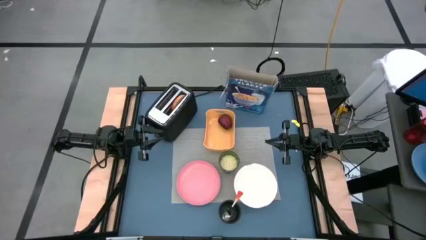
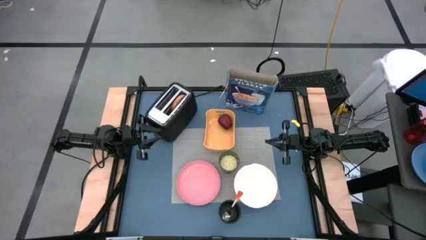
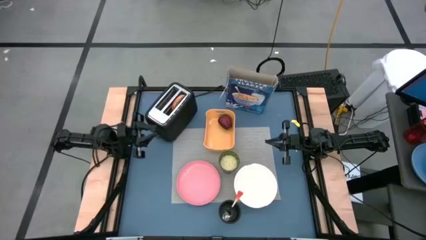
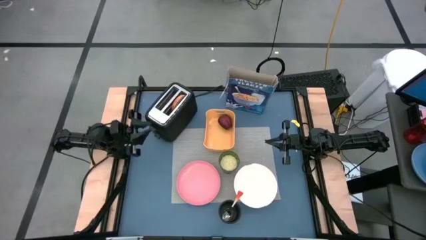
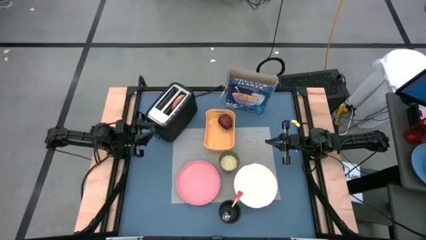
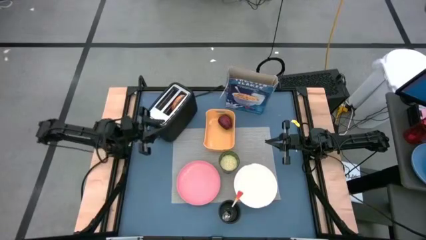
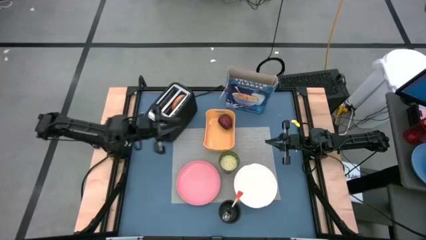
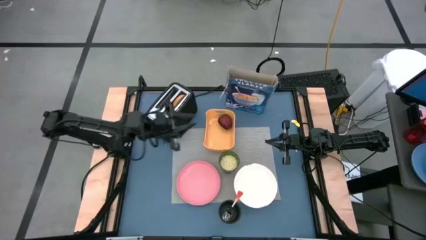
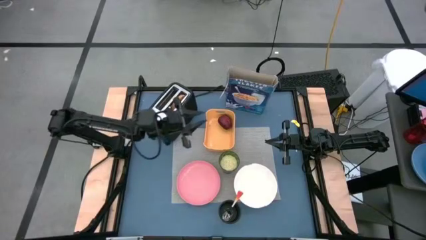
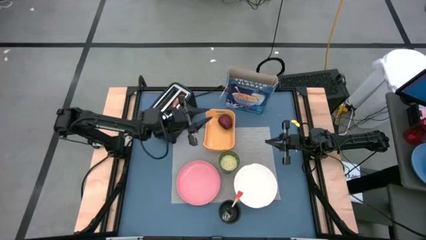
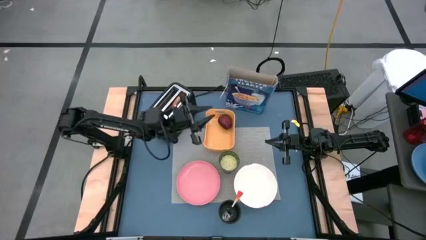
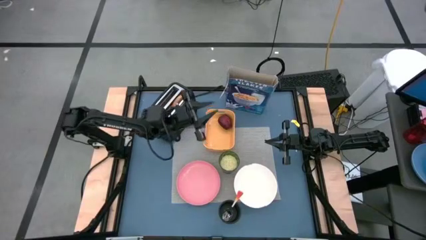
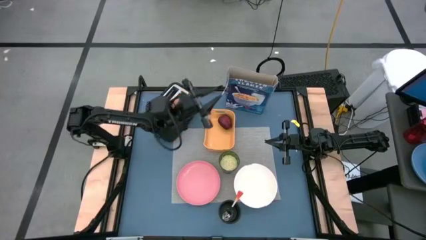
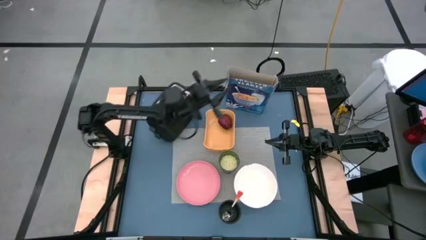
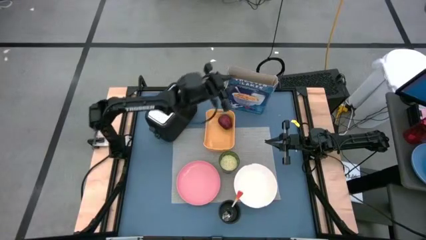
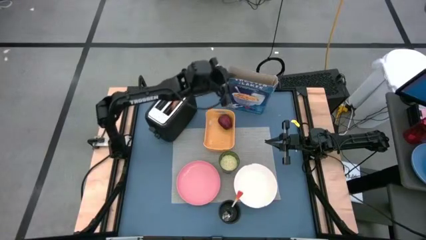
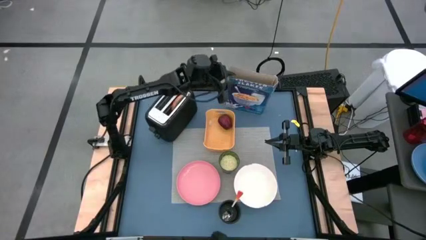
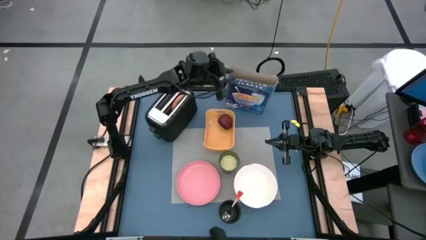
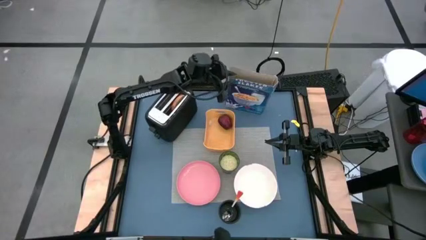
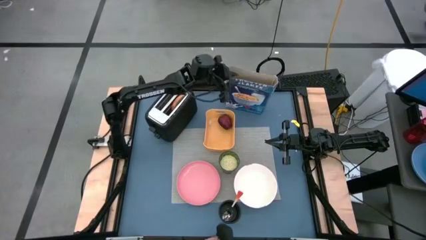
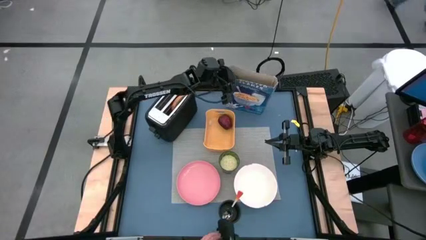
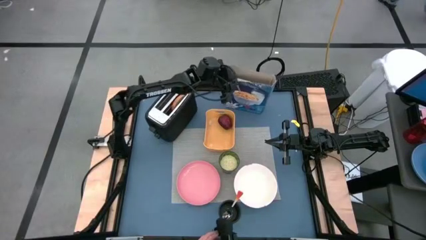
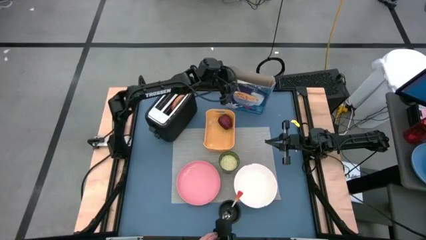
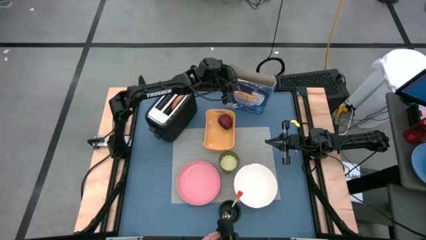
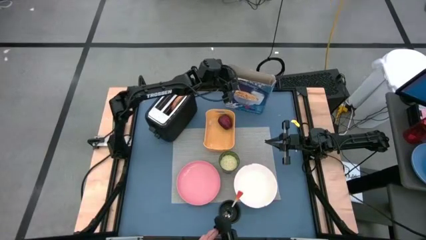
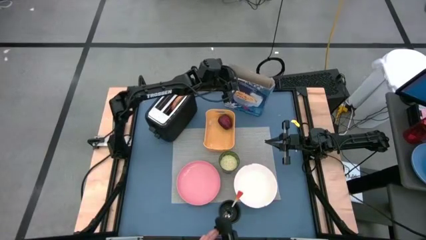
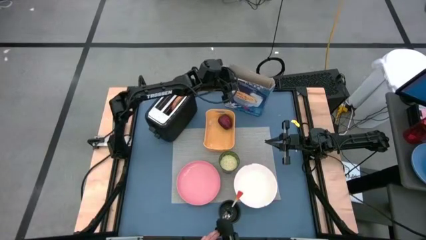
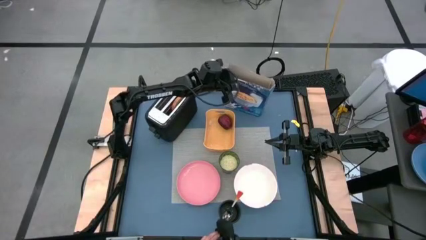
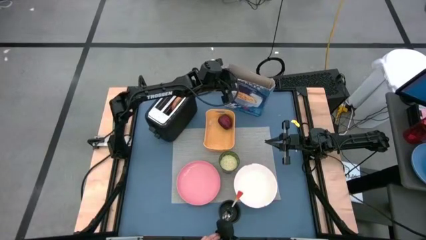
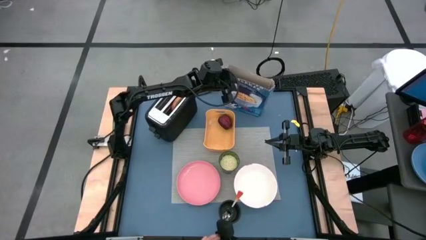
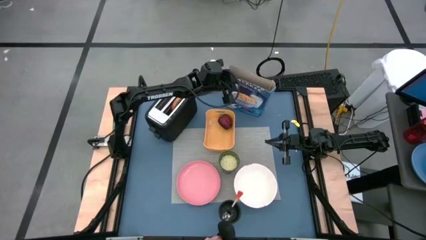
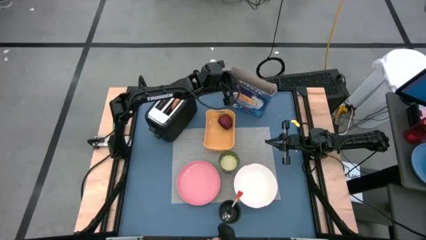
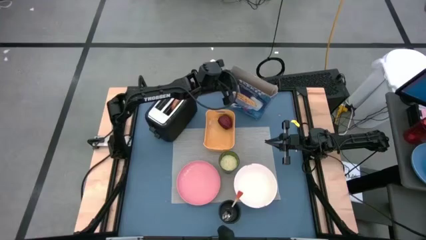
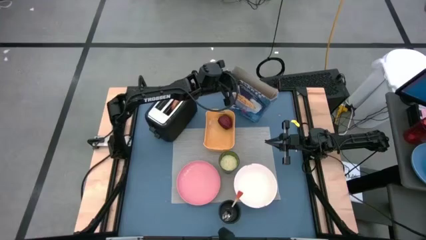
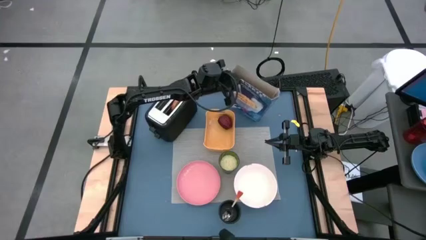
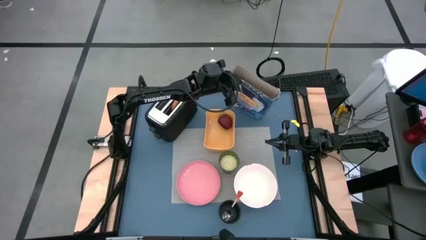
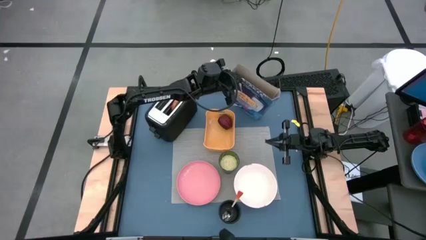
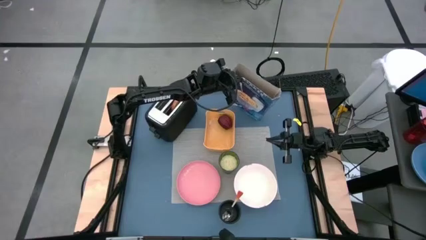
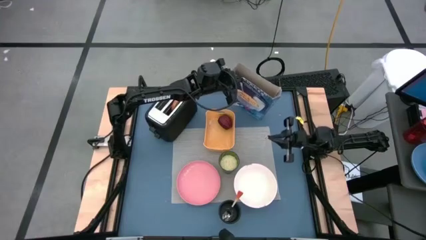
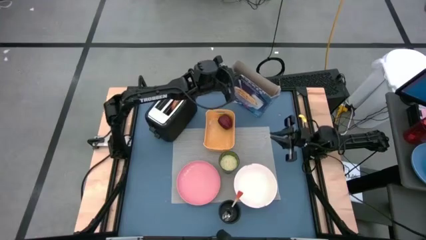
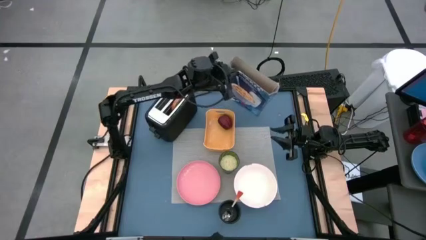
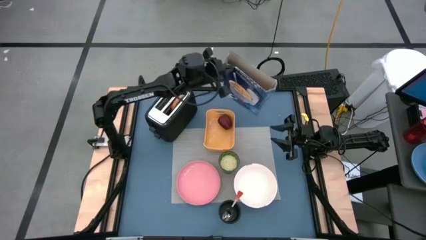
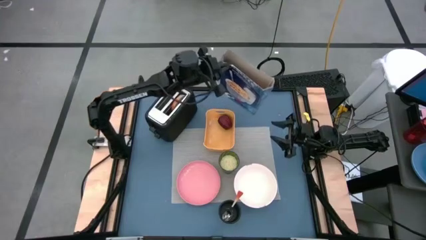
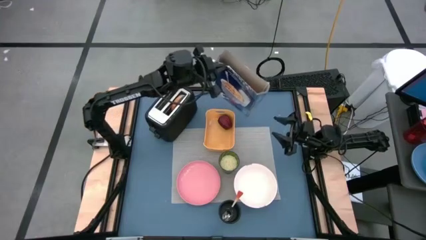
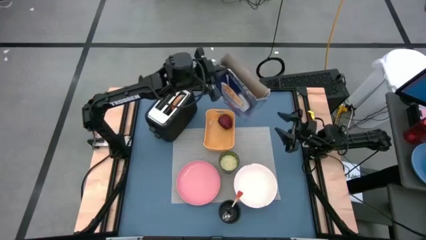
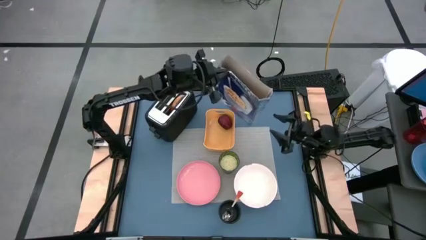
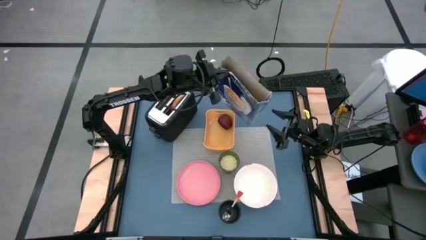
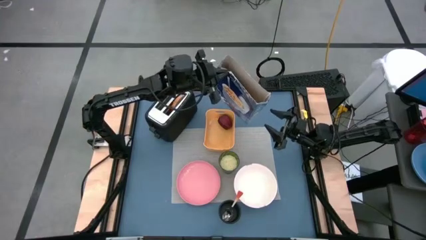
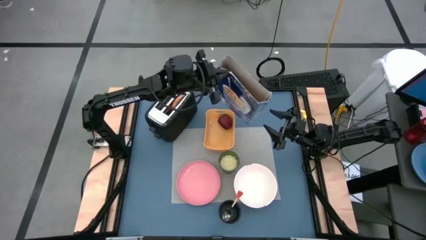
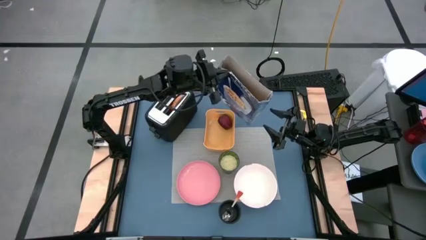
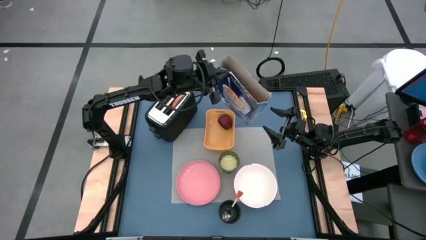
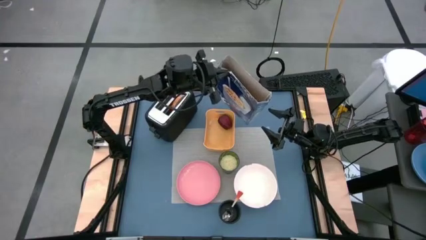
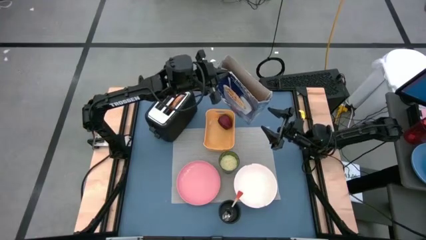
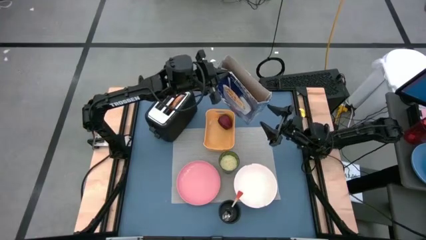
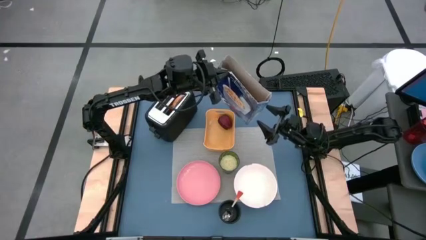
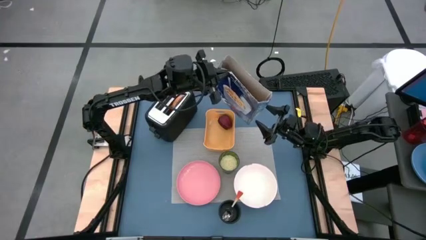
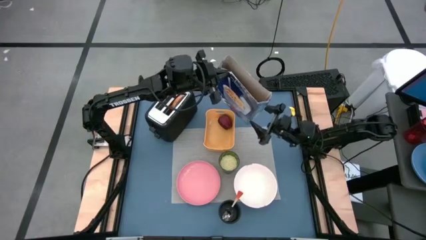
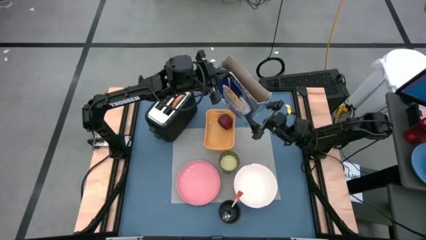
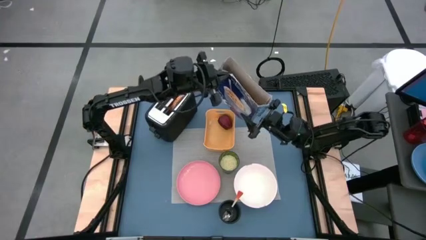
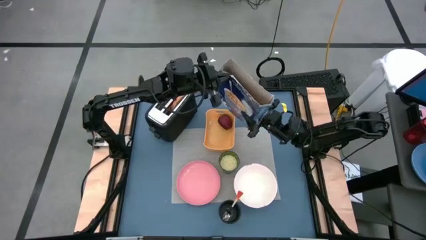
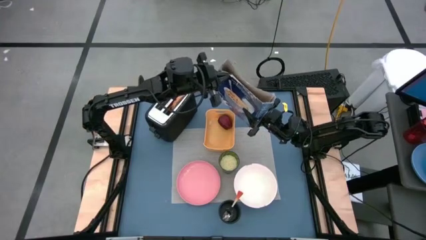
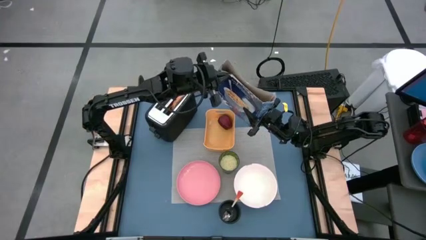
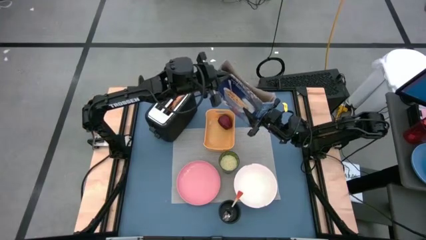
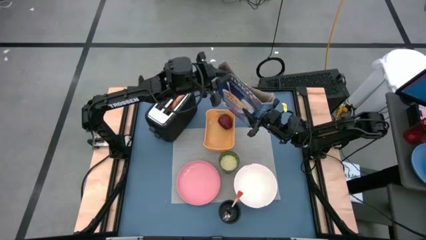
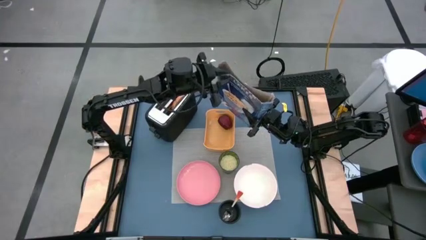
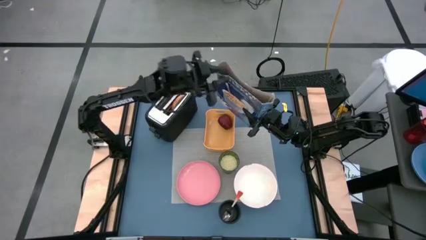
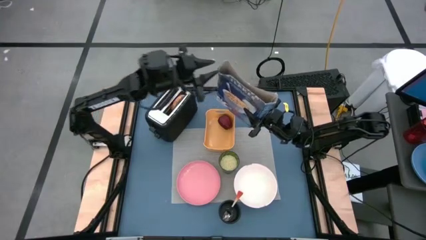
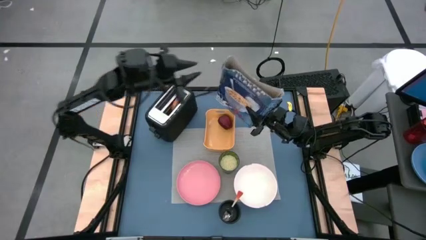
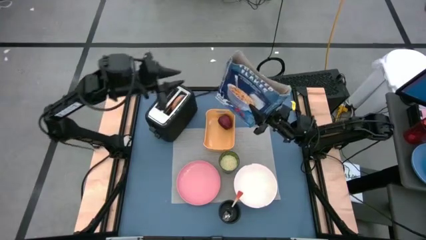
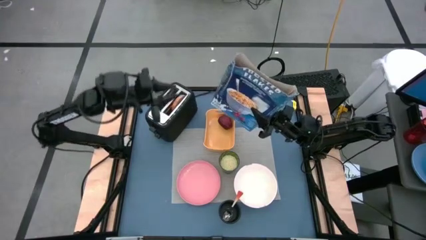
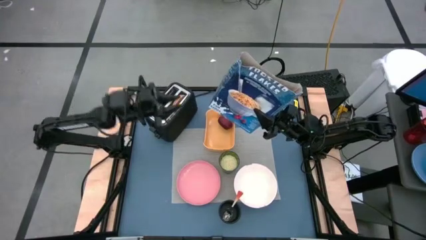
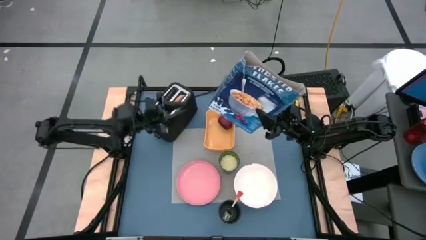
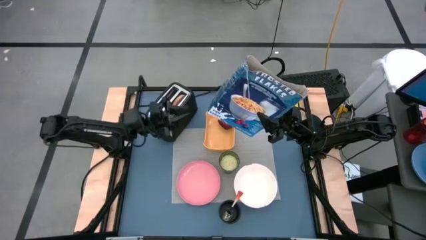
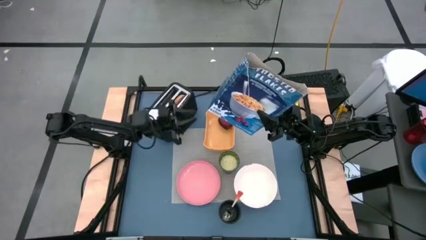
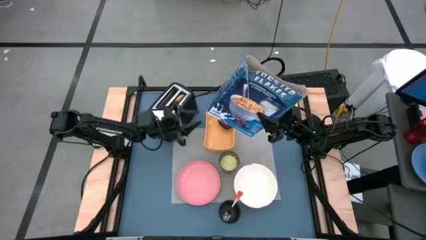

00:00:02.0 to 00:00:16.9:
Task: Arrange a breakfast setting
Pour the cereals into the white bowl
